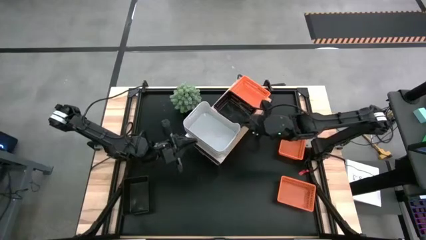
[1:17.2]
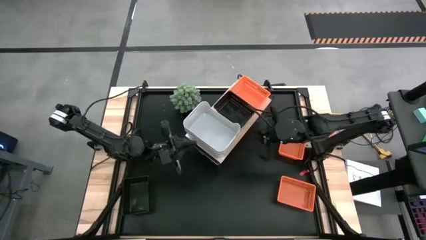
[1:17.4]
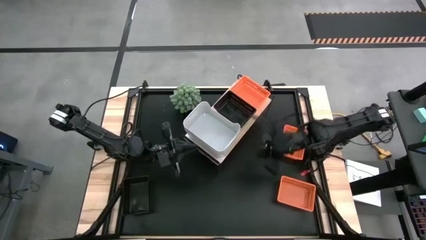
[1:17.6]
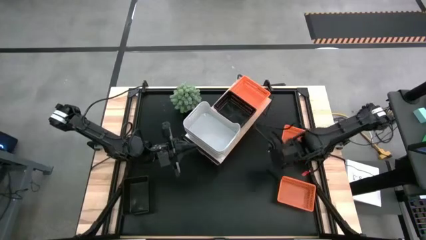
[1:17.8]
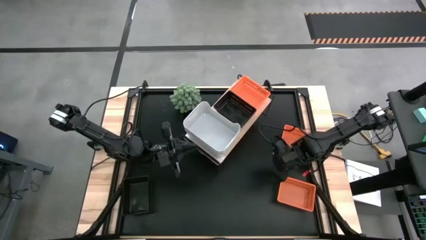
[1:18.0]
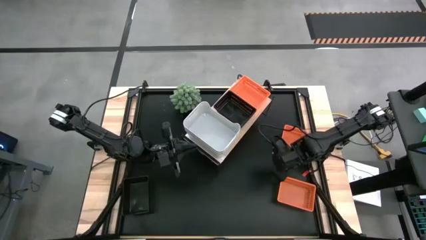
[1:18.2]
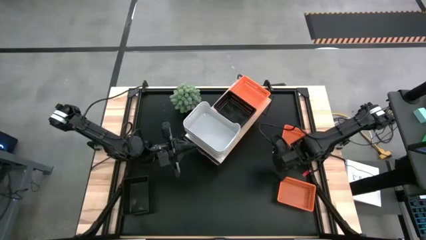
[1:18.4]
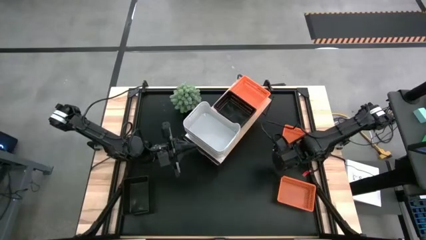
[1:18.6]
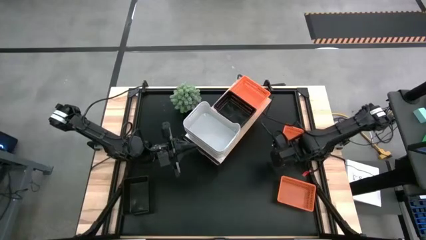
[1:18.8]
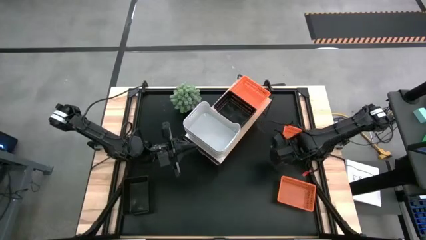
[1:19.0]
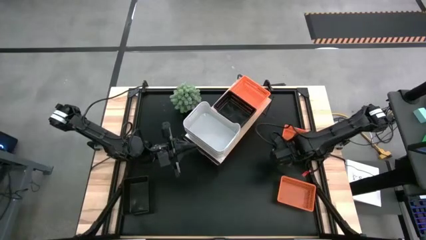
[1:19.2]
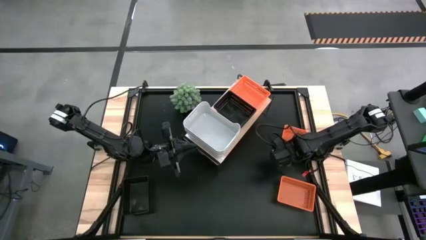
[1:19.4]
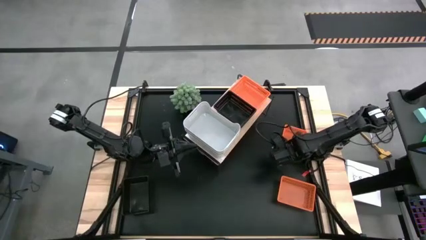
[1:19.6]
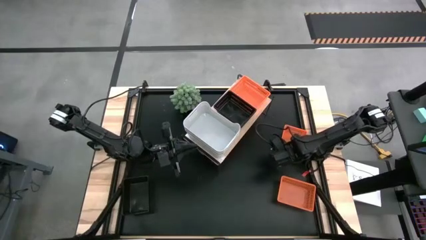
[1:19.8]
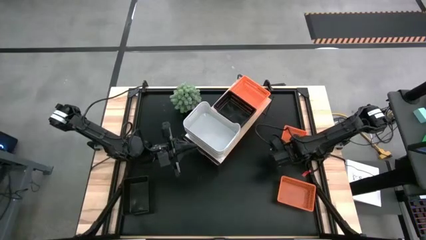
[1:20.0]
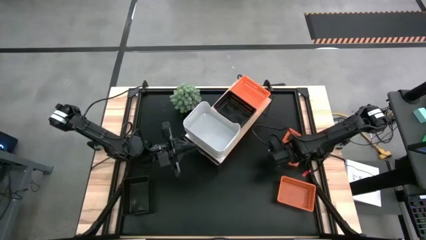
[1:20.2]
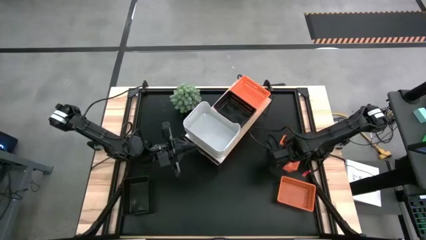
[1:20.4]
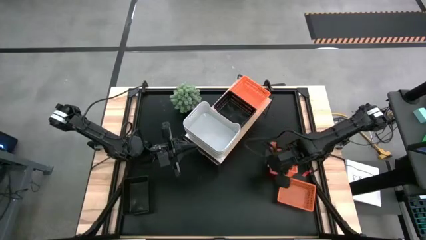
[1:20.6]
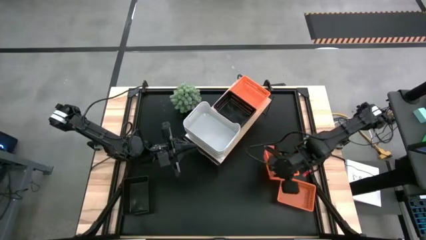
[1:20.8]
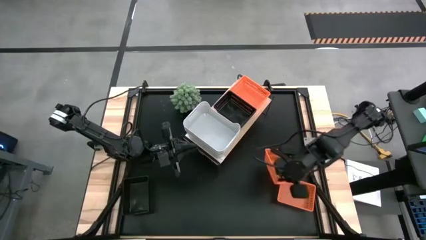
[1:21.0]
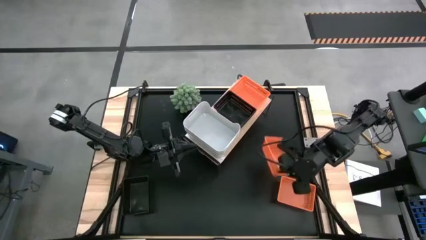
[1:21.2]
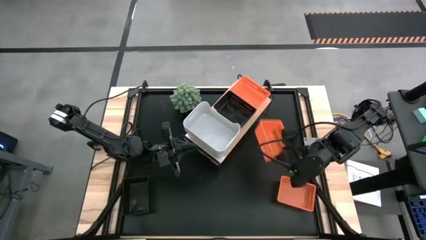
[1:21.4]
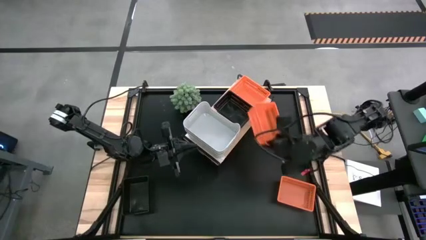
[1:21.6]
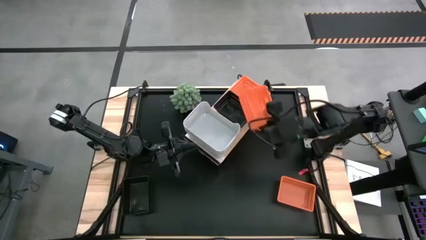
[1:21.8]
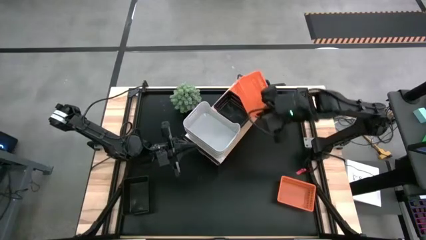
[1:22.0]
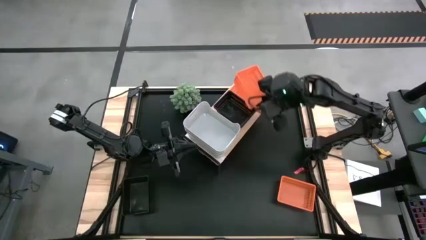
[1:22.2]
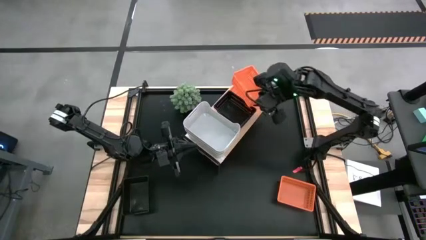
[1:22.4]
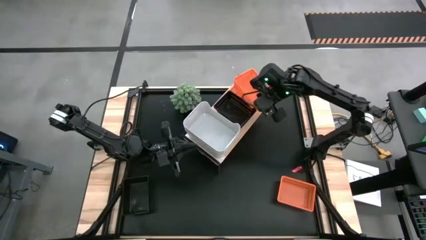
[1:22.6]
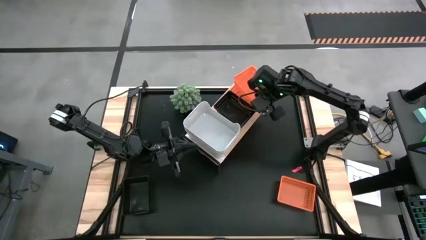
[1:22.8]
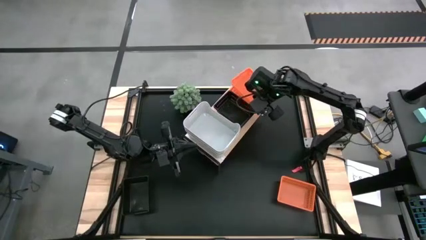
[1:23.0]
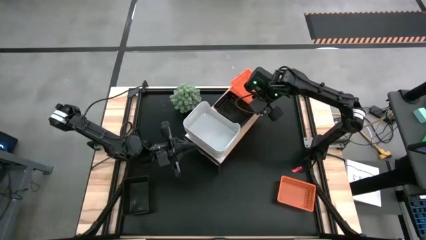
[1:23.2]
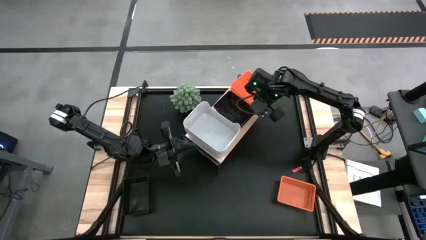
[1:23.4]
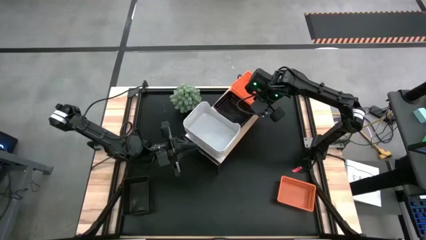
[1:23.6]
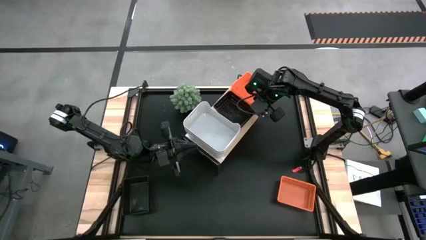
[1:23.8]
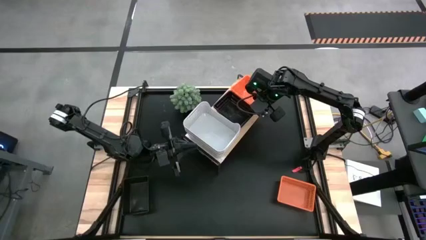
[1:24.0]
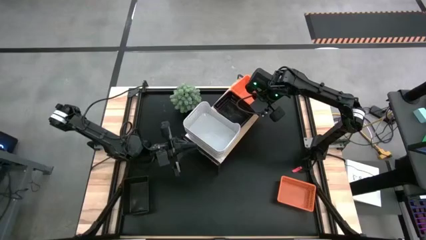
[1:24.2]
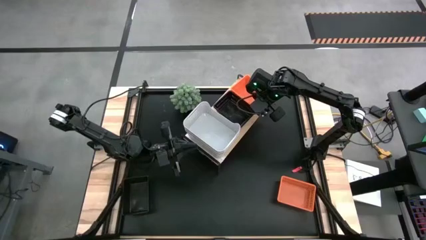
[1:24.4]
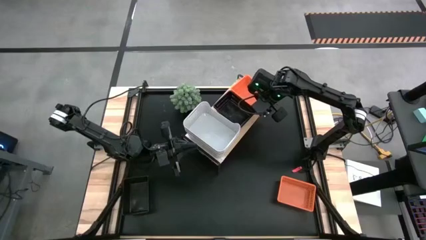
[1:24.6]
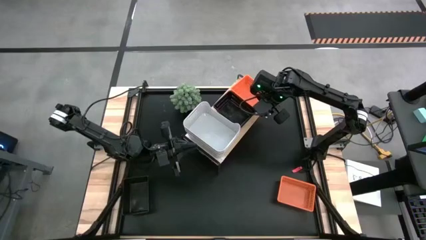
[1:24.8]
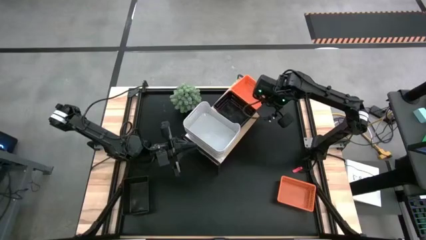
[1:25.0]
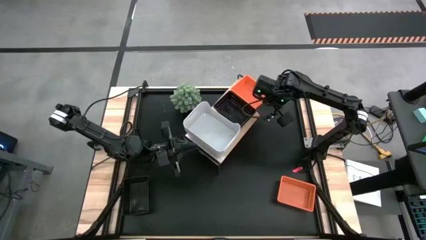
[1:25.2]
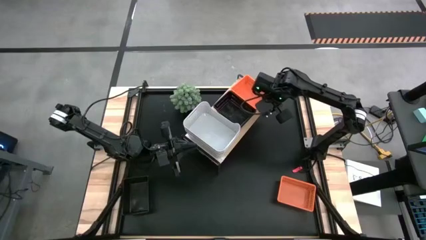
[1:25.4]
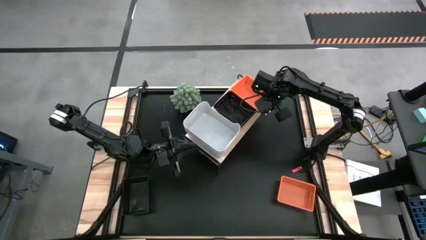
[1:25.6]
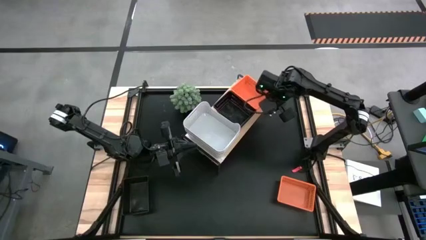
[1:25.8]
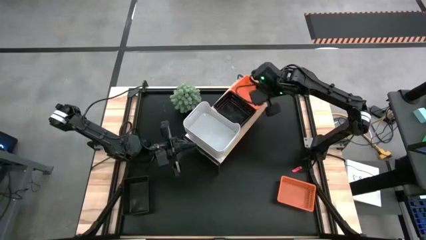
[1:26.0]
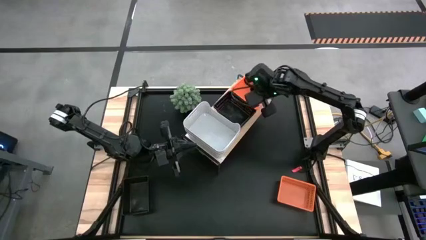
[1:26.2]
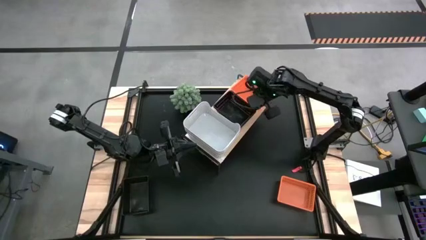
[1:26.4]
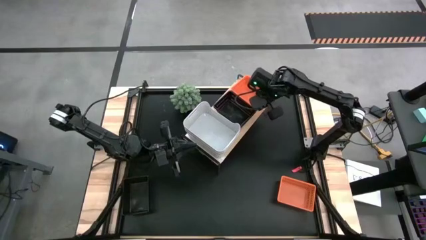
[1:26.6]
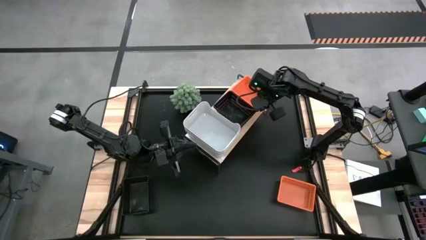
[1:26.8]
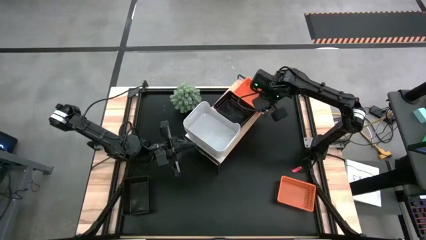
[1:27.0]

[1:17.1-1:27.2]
Task: Stack baskets on shelf by color
Stack the top orange bin on top of the other orange bin on the shelf
